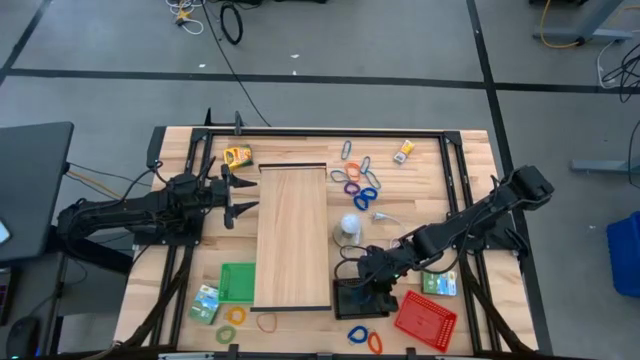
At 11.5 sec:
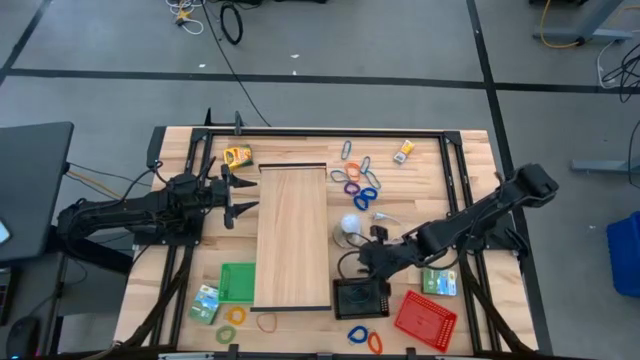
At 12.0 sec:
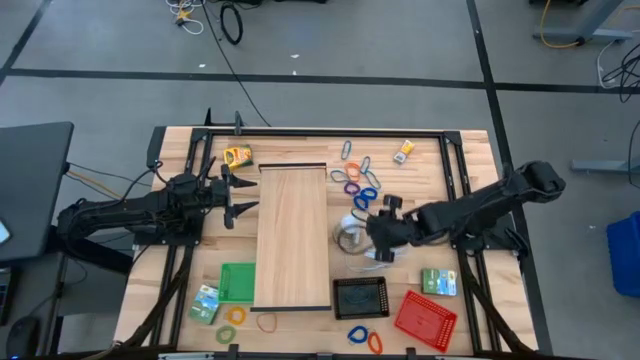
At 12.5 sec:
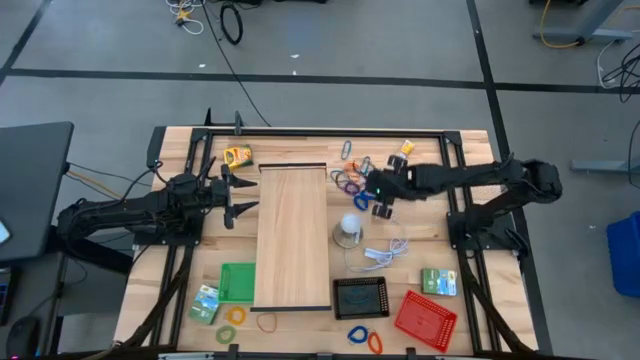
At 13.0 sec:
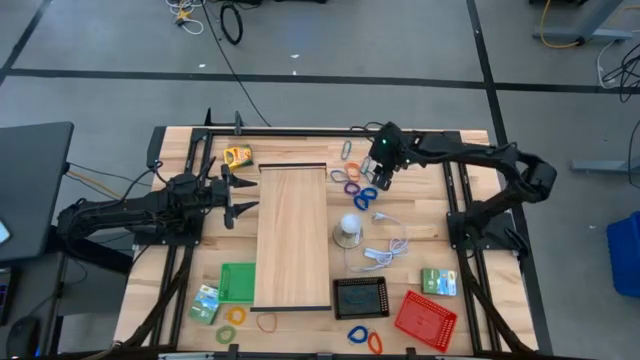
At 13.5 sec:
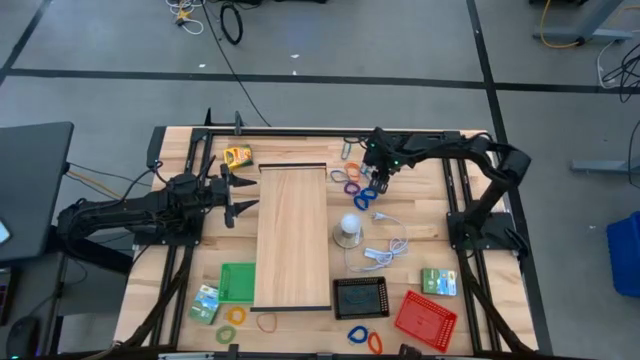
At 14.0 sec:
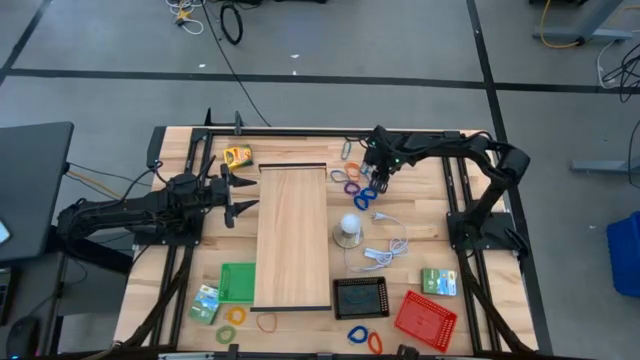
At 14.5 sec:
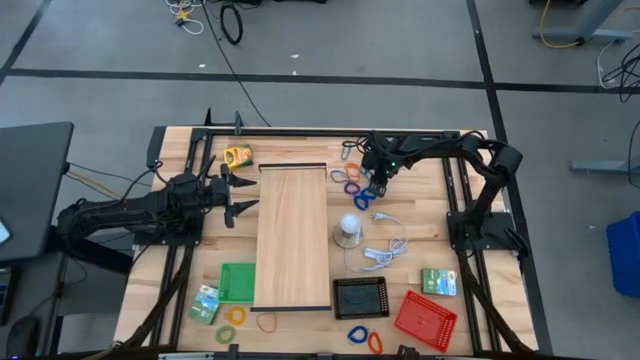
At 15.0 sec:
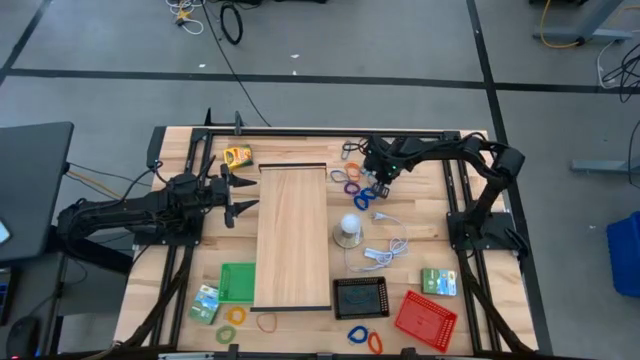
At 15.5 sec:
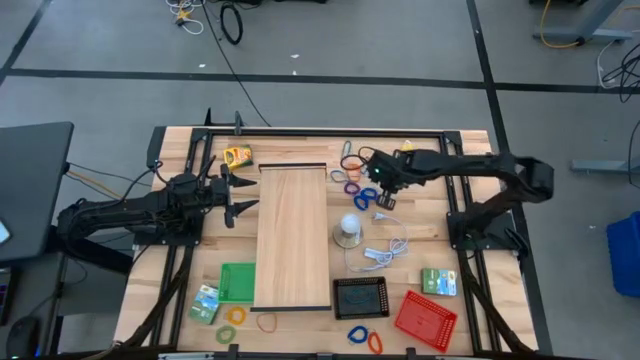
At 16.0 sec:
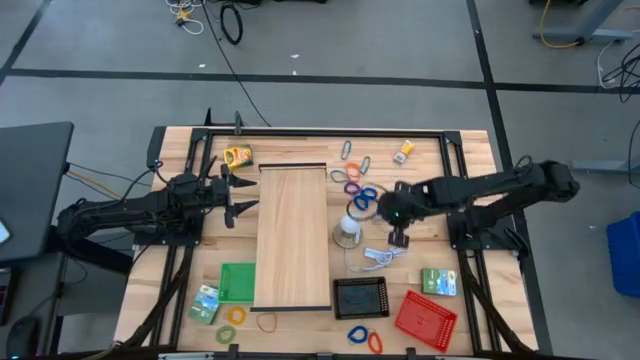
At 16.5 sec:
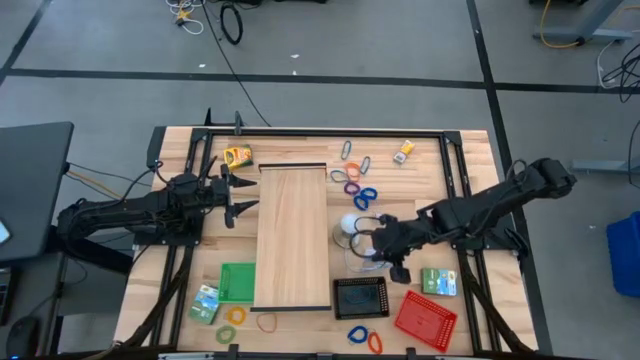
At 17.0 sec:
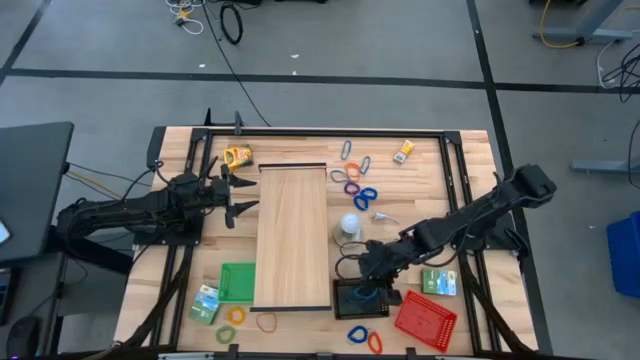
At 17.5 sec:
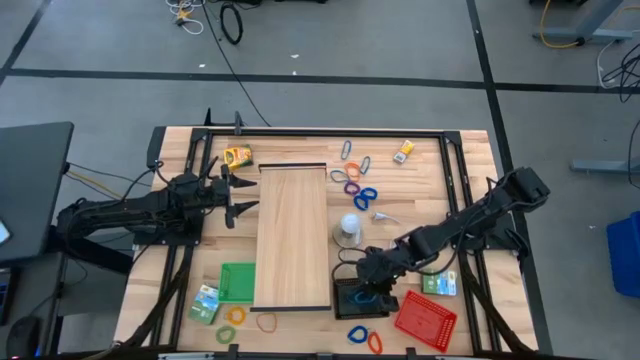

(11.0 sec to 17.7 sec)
Task: Pick & Place Office Desk Supplies
Put the blue rubber band into the black bin

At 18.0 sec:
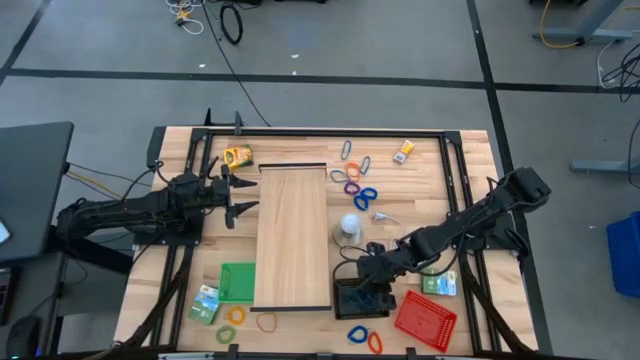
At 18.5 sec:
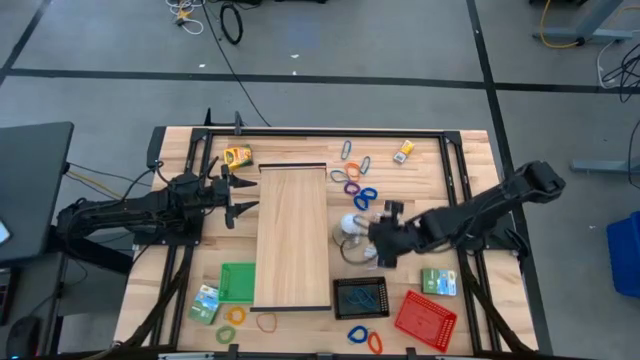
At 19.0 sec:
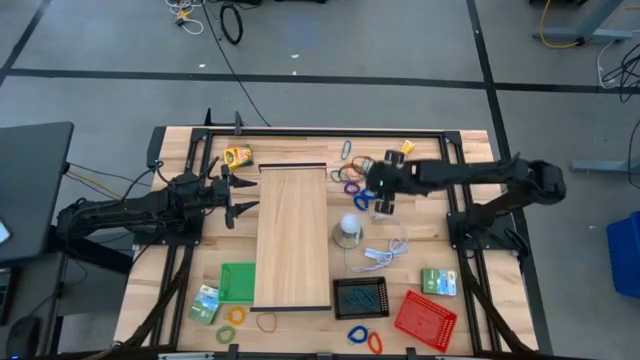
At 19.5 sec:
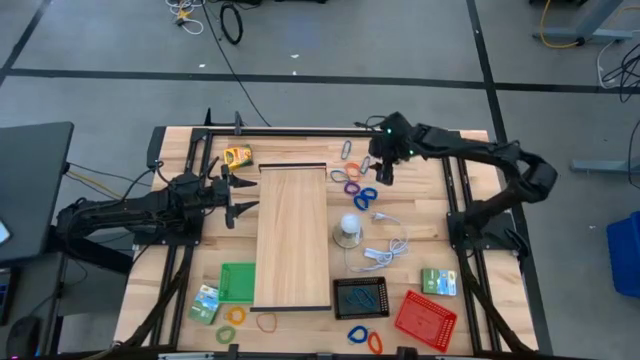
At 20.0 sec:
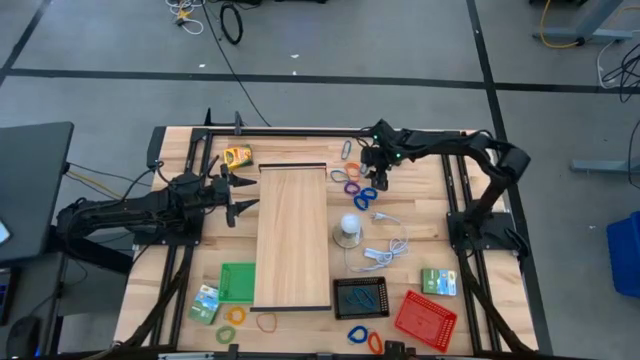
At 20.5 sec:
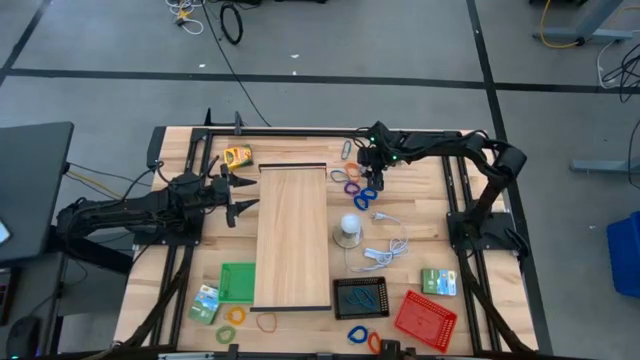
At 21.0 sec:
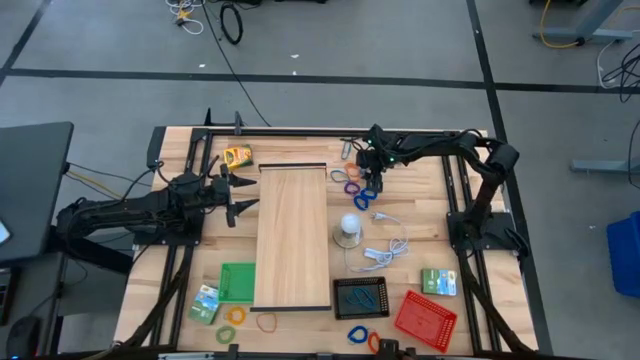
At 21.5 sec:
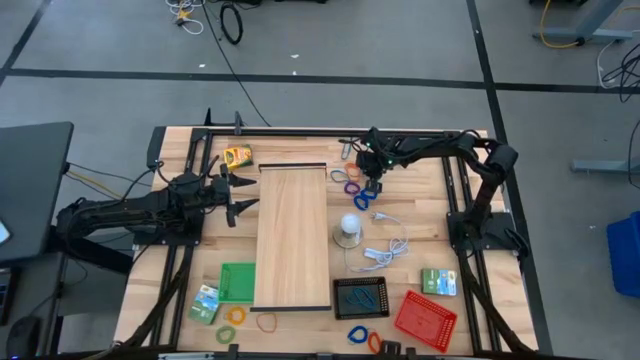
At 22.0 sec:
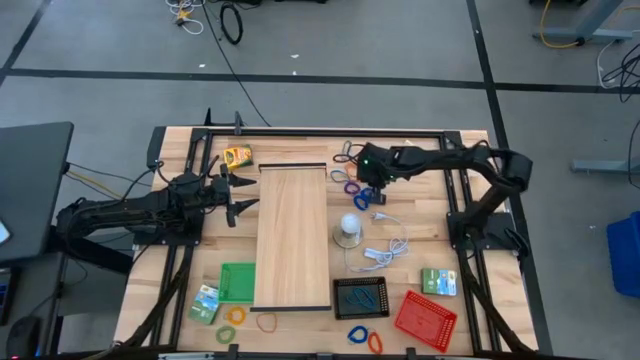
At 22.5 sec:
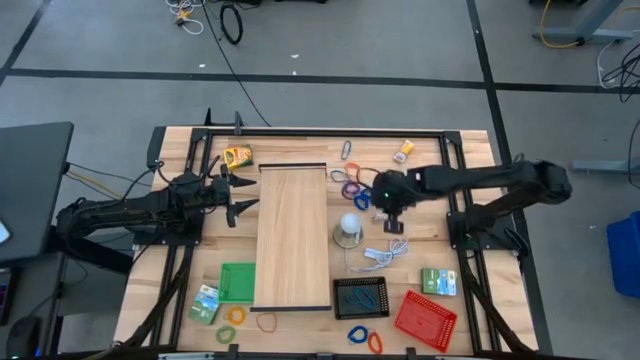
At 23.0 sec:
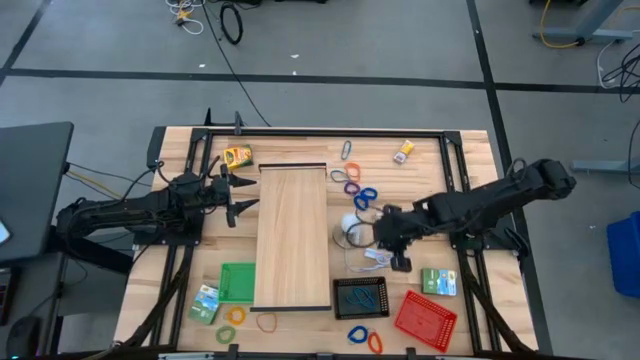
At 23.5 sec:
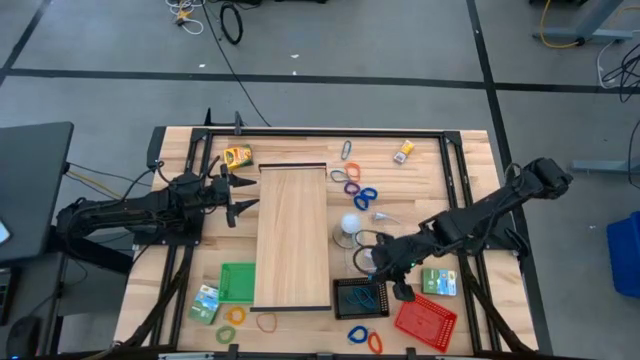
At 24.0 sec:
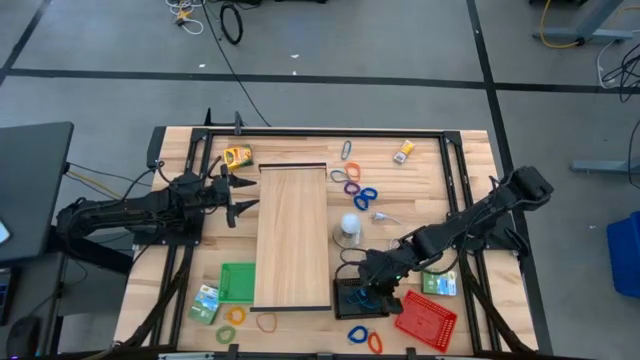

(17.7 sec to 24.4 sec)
Put the blue rubber band into the black bin

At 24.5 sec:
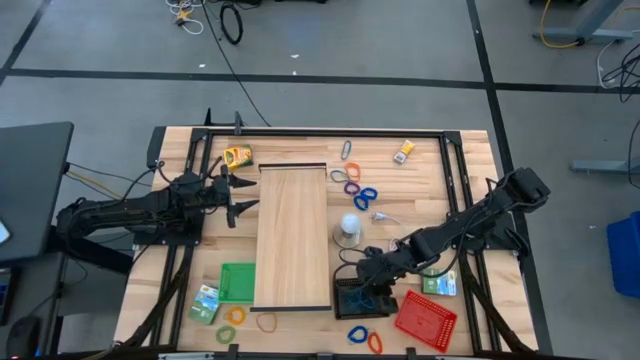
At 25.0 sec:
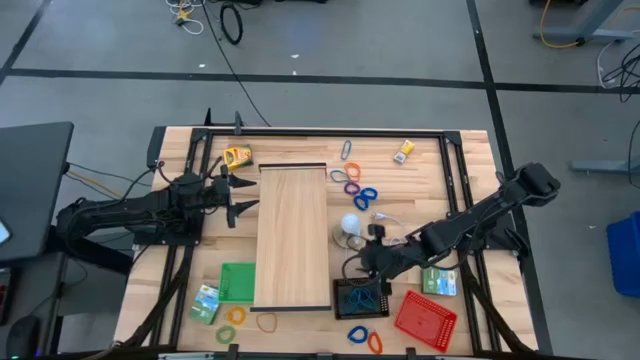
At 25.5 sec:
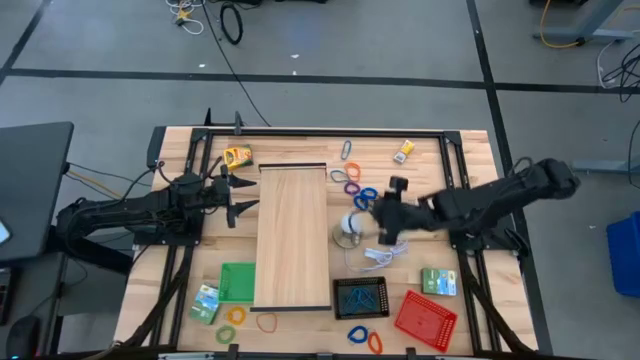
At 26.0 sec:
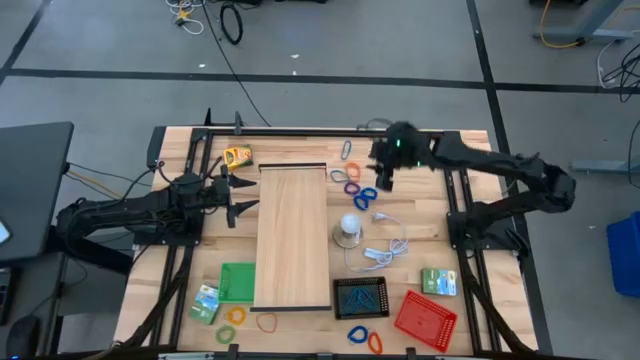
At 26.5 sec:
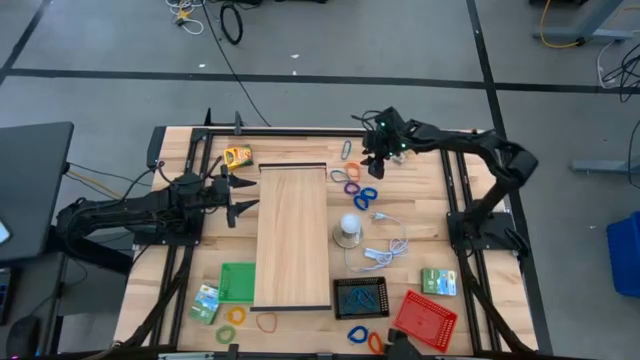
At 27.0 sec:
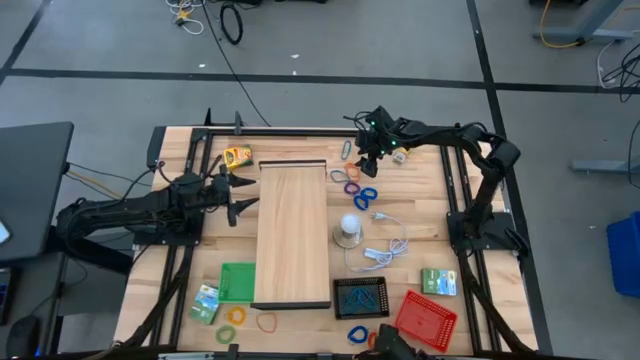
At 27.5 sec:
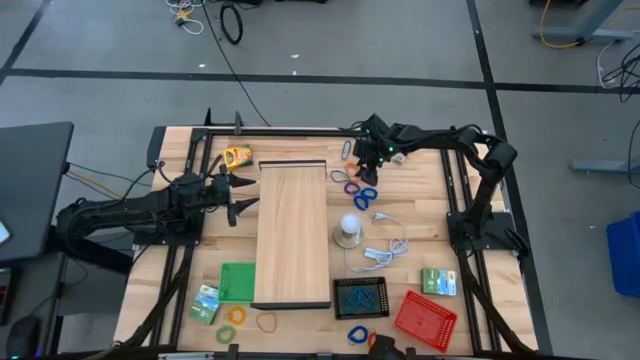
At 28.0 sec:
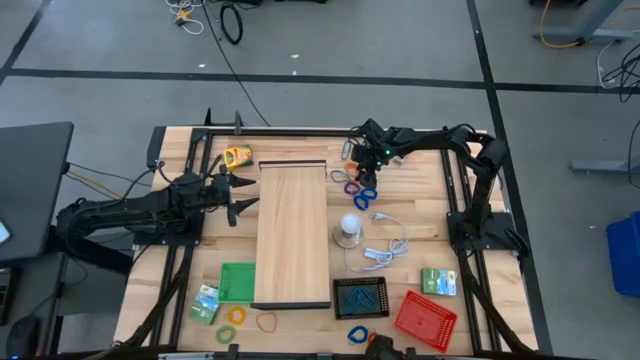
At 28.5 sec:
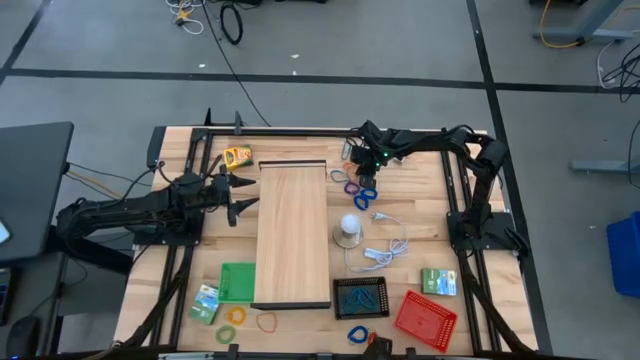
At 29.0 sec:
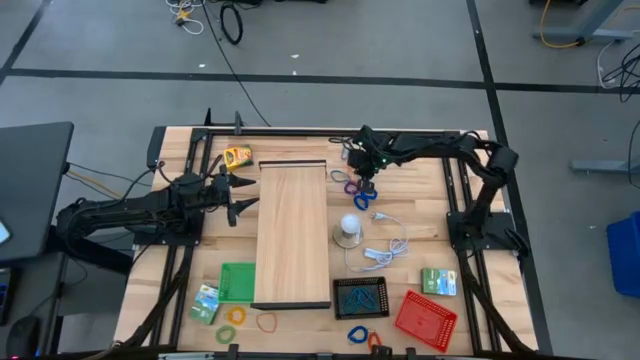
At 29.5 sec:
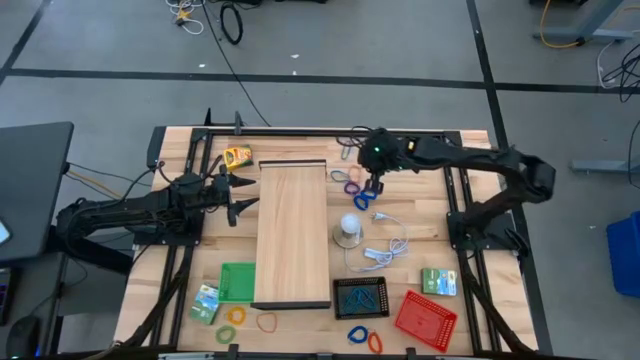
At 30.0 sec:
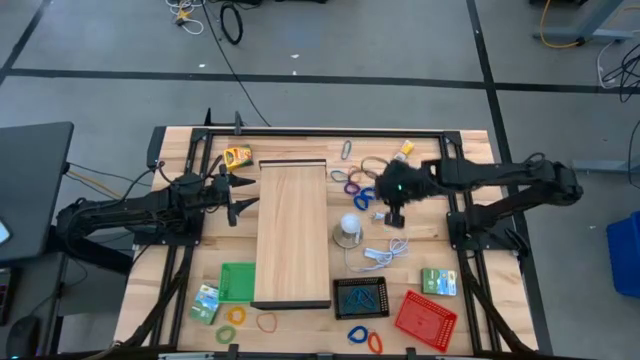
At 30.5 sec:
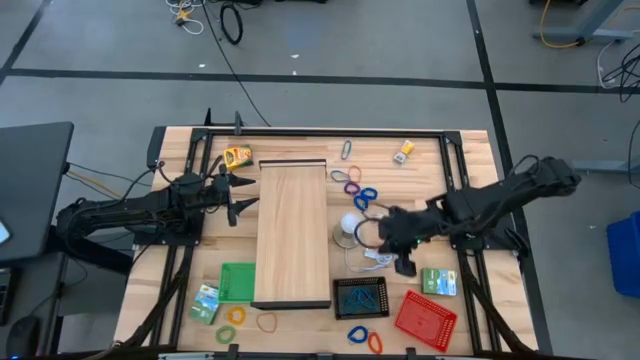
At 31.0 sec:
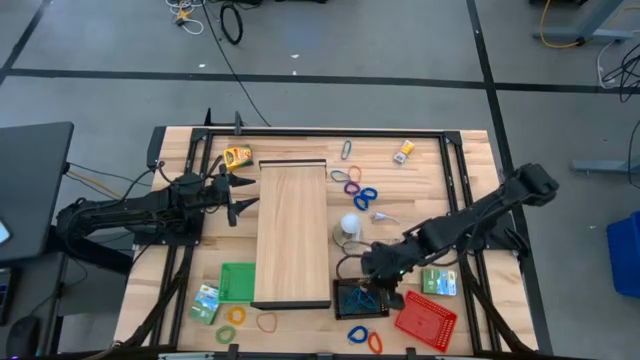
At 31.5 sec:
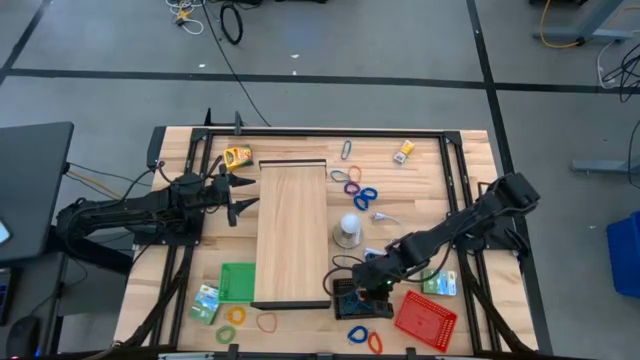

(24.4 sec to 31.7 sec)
Put the top right orange rubber band into the black bin
